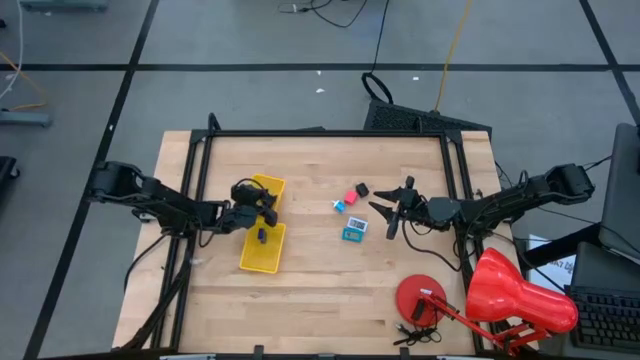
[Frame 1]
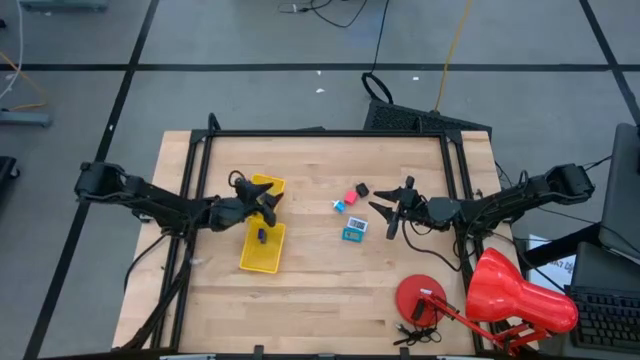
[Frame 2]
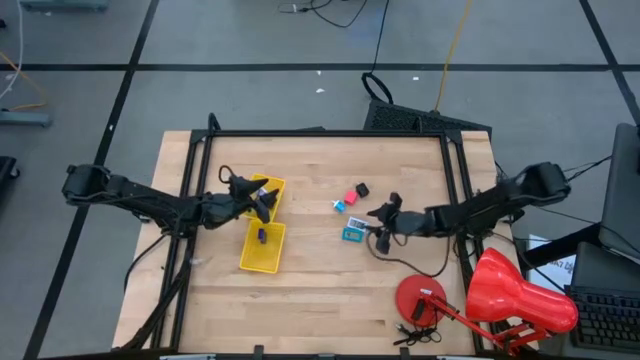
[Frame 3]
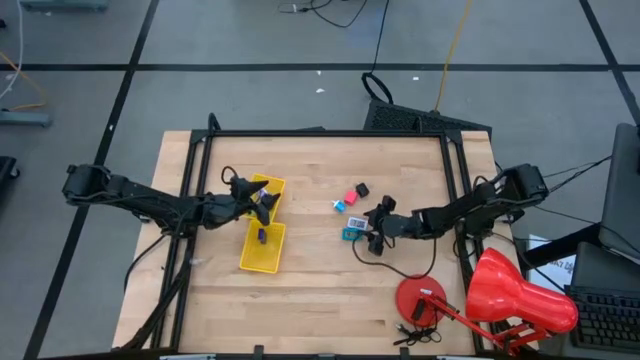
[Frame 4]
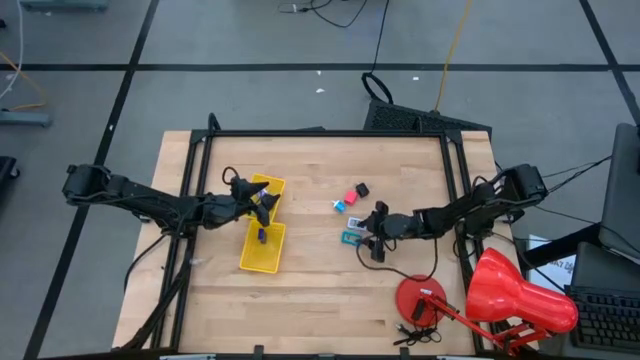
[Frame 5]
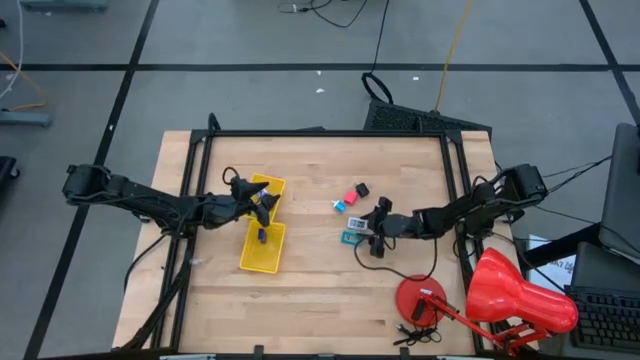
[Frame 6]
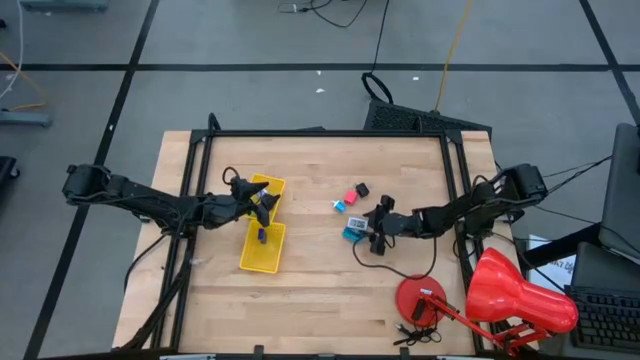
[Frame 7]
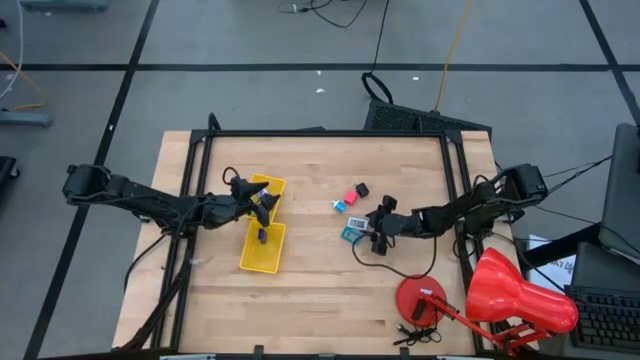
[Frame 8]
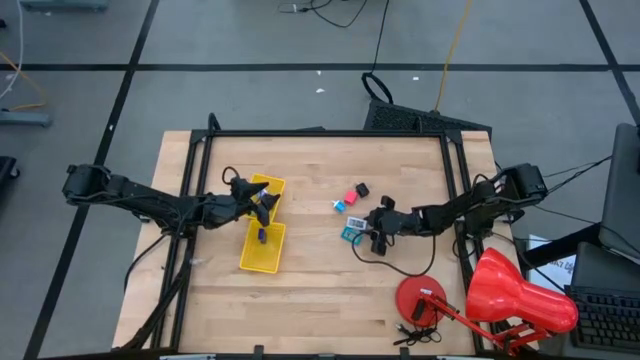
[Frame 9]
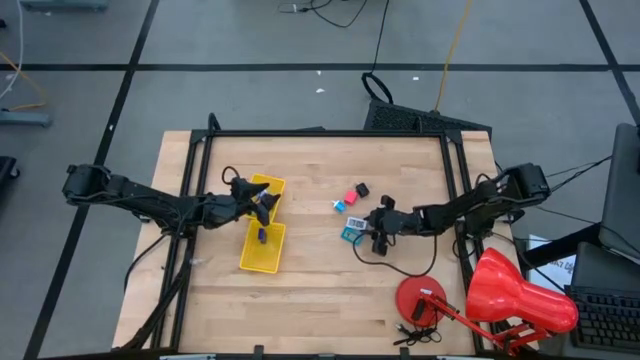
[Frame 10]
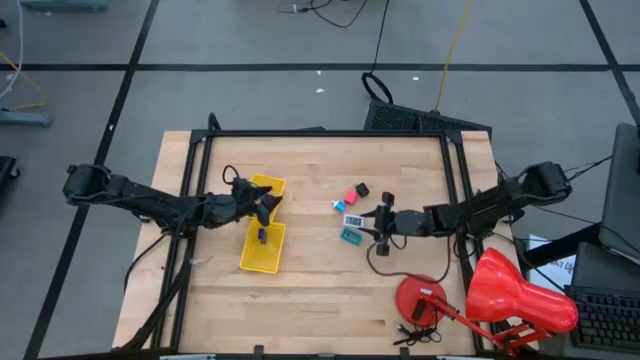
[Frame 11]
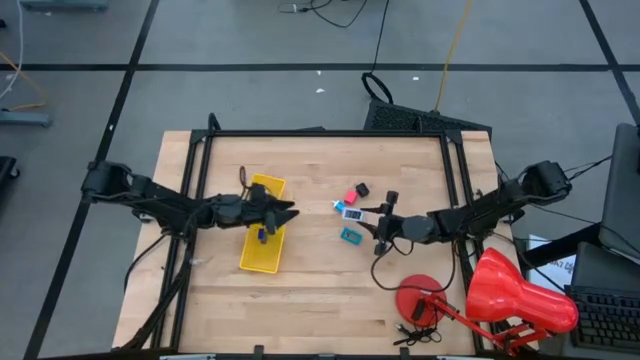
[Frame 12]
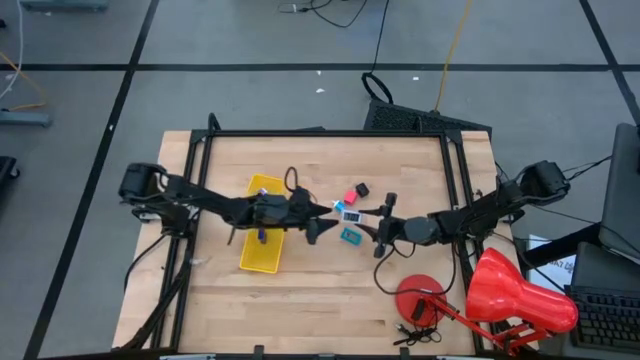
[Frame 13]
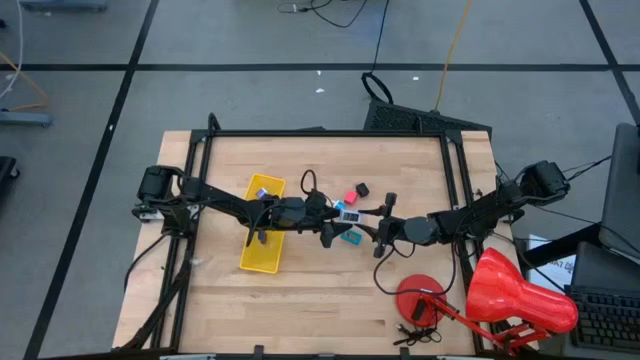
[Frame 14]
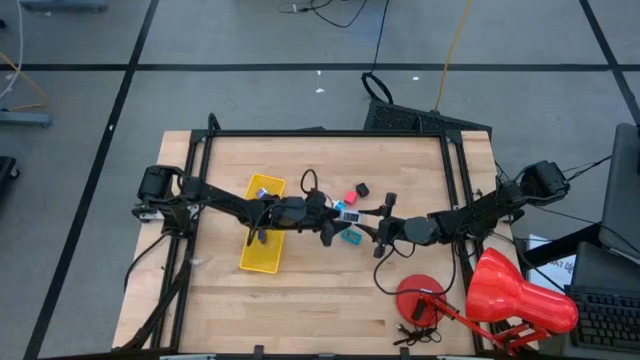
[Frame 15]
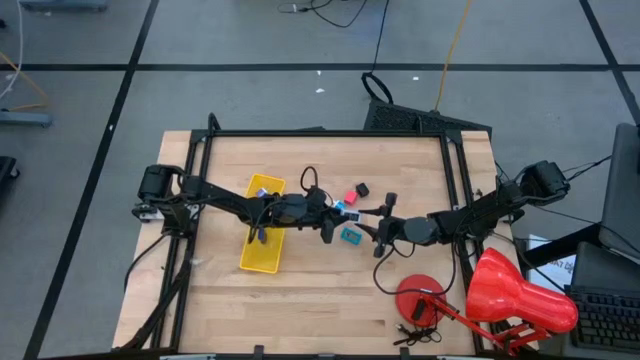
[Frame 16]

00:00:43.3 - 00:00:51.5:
Task: Pick & Place Office items
Put the white timer into the bottom yellow basket

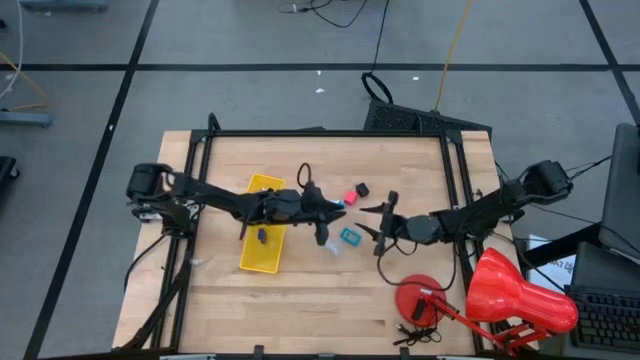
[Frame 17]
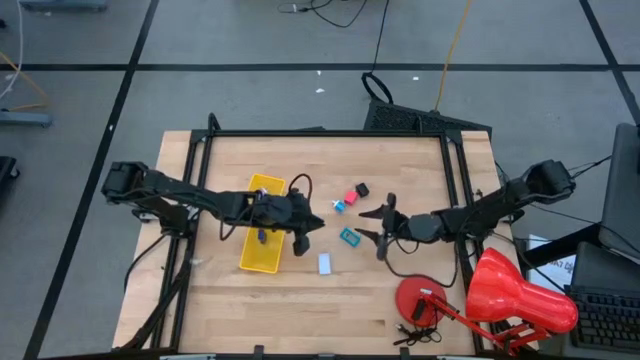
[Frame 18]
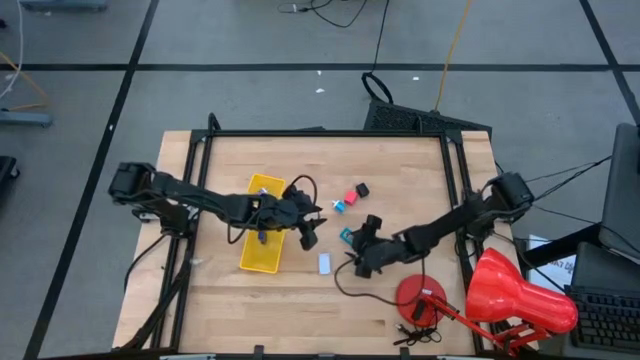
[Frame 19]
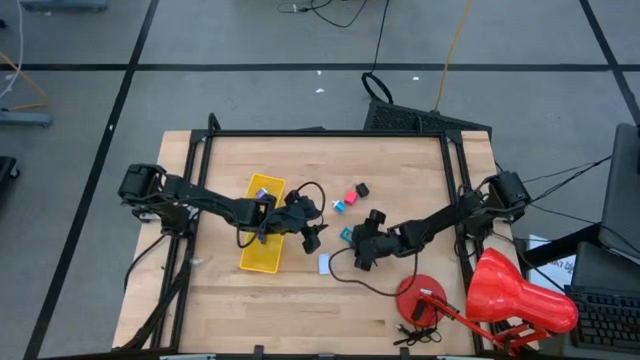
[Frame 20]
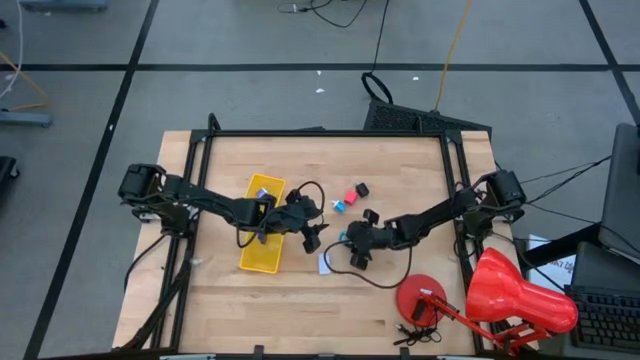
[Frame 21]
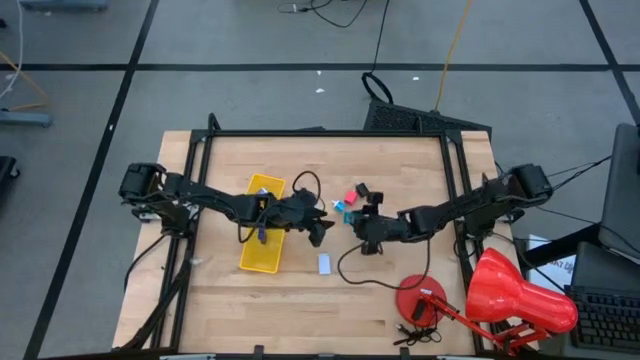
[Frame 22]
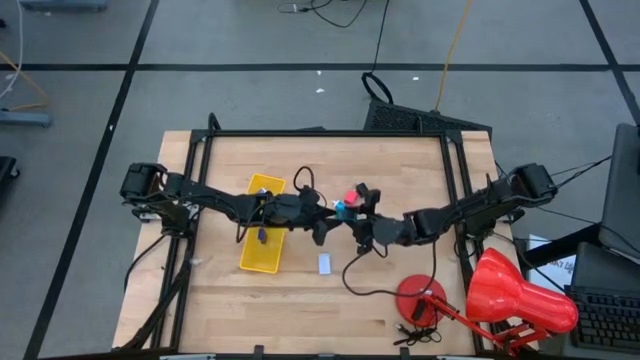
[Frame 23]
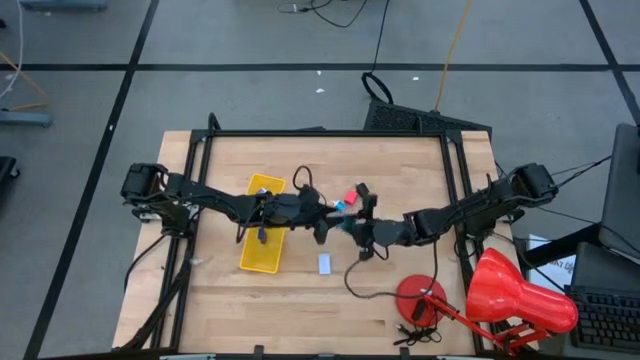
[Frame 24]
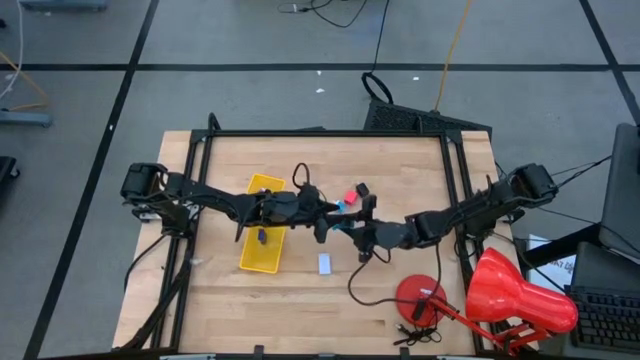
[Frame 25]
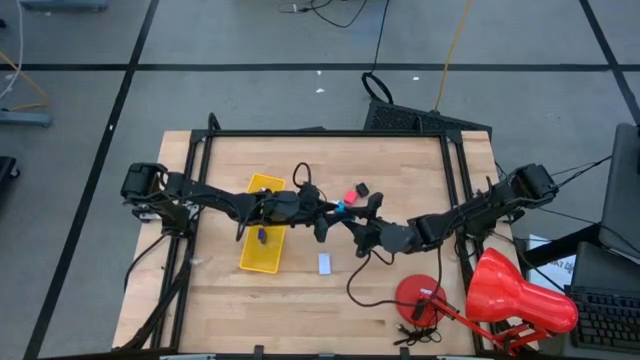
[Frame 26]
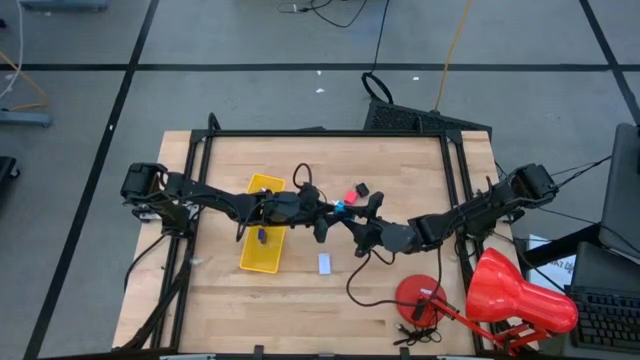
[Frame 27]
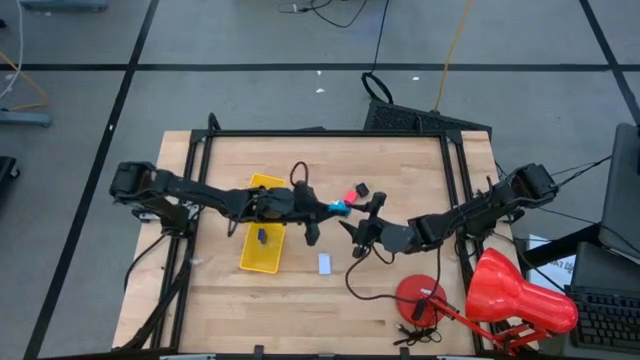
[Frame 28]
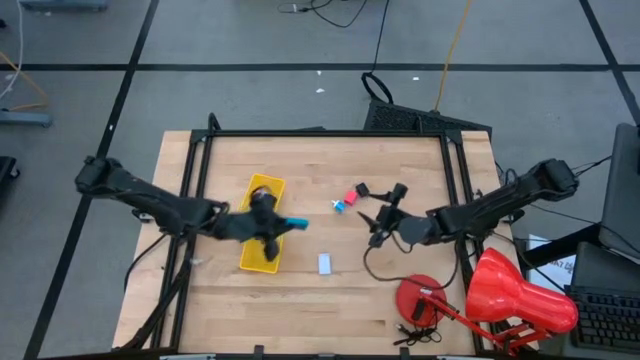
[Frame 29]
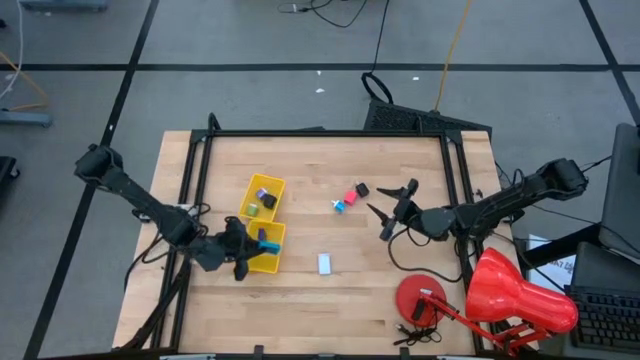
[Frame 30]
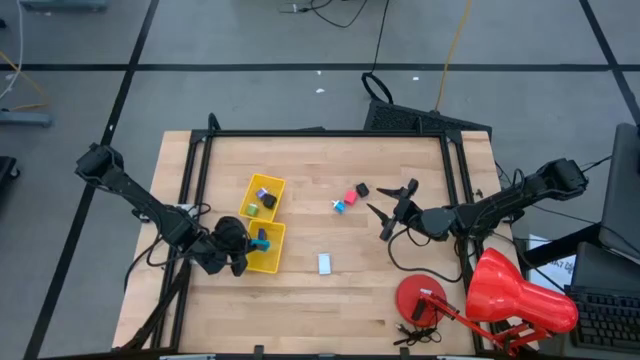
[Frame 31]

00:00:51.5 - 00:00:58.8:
Put the light blue timer into the bottom yellow basket

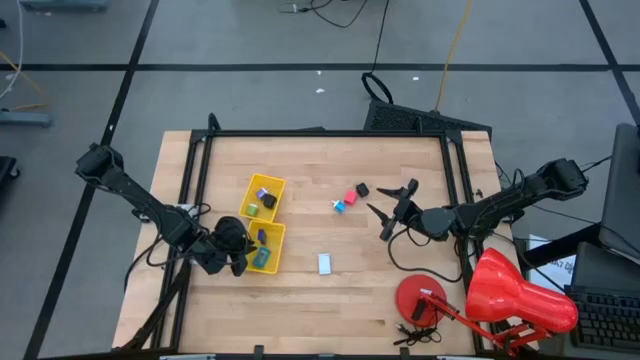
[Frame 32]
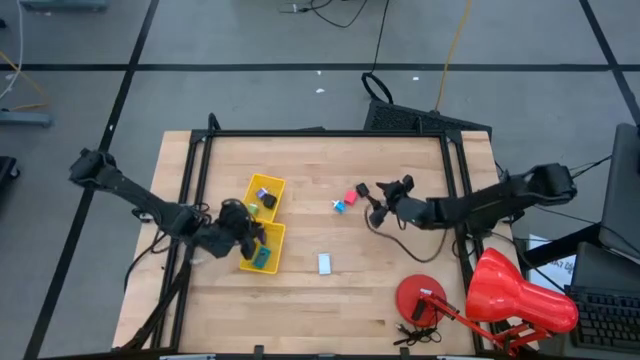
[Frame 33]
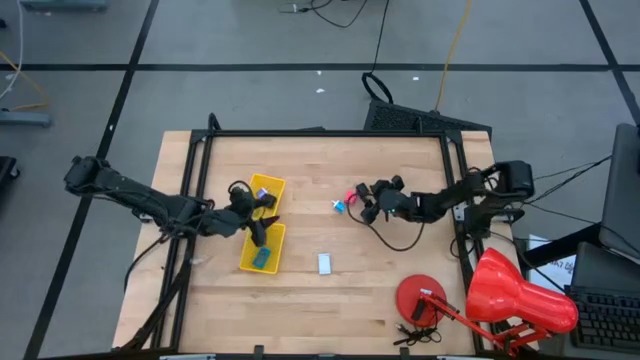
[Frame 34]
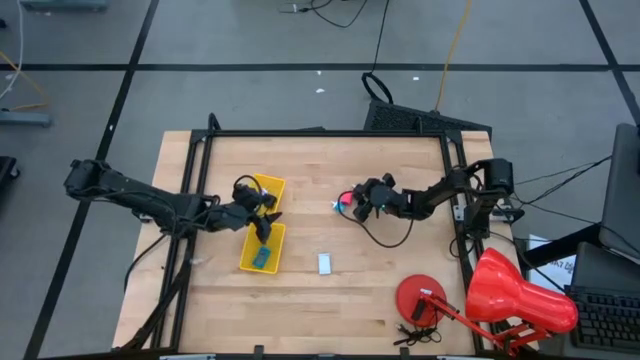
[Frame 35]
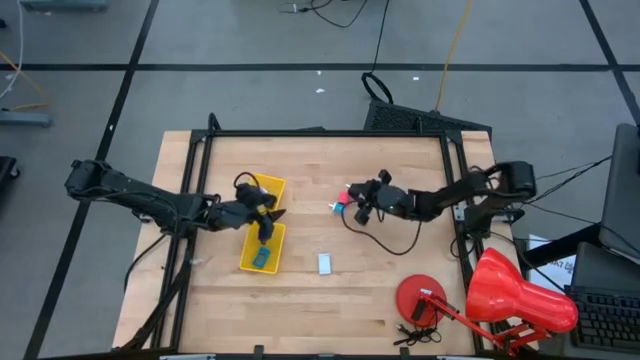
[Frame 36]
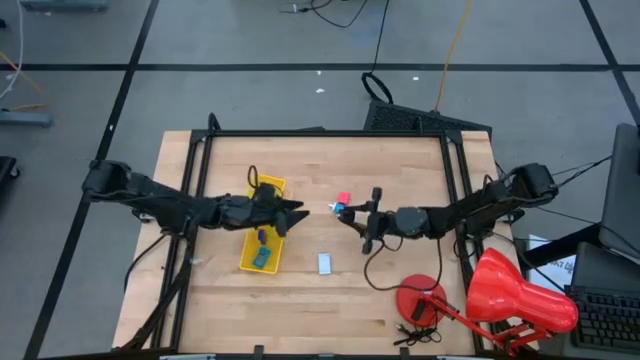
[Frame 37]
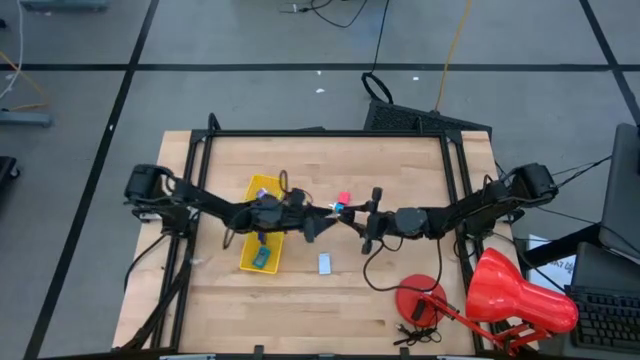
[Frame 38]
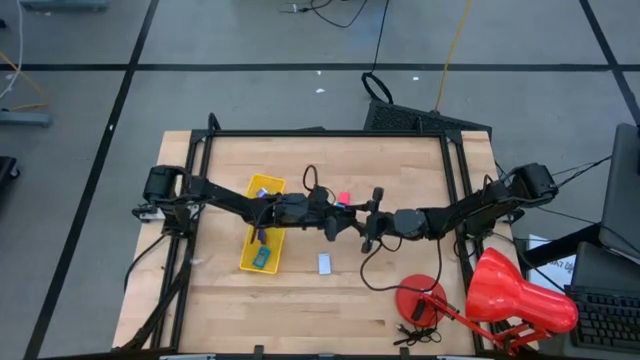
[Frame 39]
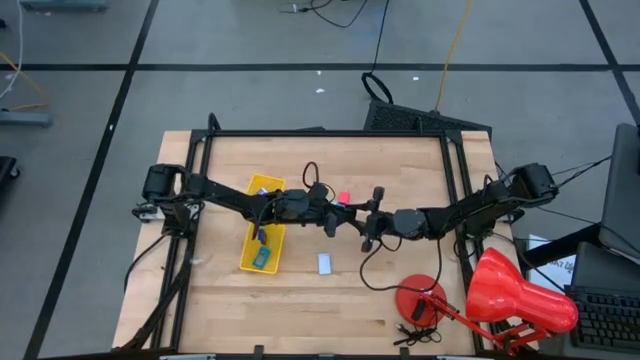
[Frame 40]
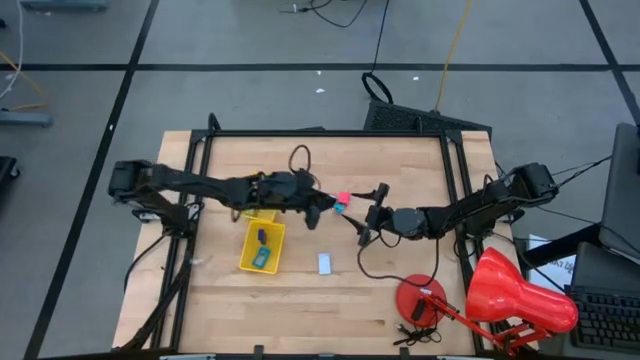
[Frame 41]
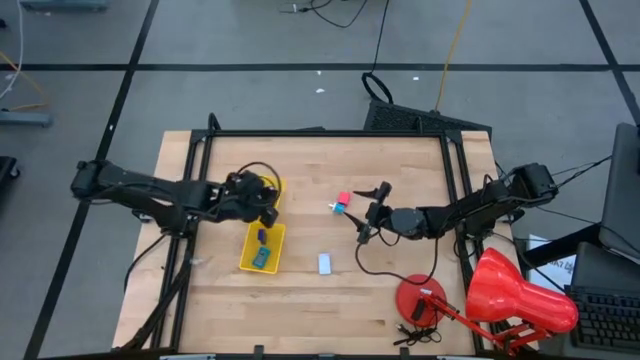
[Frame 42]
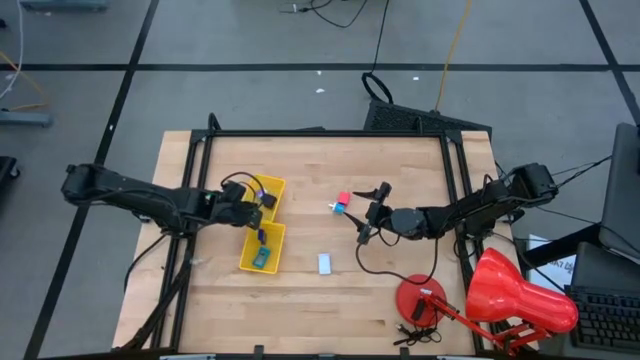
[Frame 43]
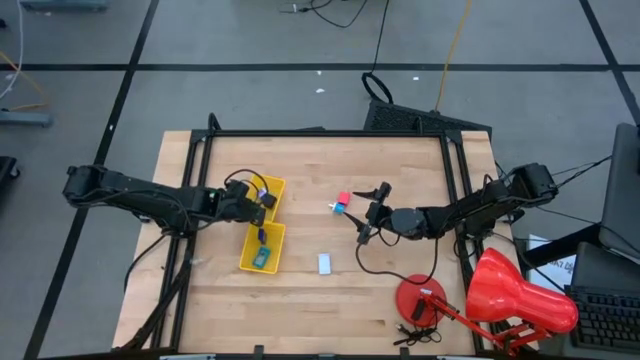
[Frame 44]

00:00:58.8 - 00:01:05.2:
Put the black adapter into the top yellow basket
